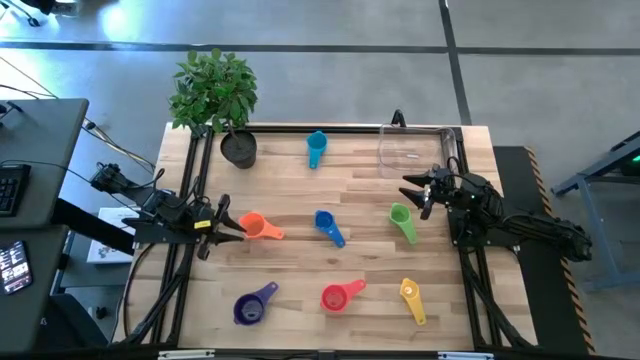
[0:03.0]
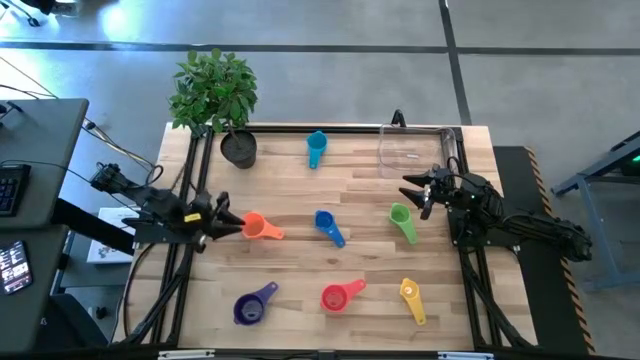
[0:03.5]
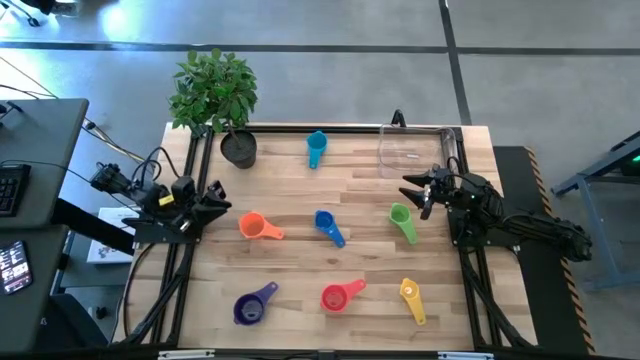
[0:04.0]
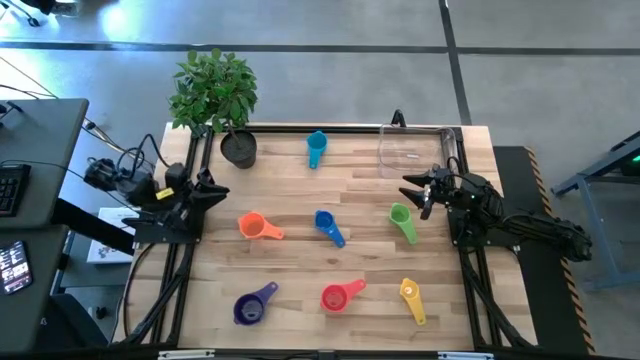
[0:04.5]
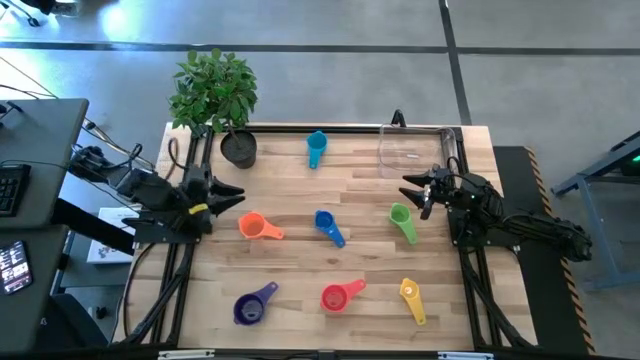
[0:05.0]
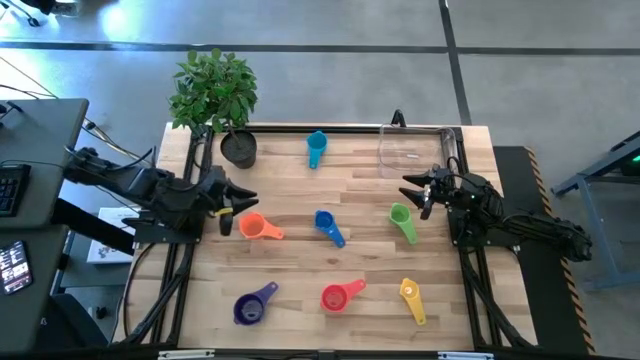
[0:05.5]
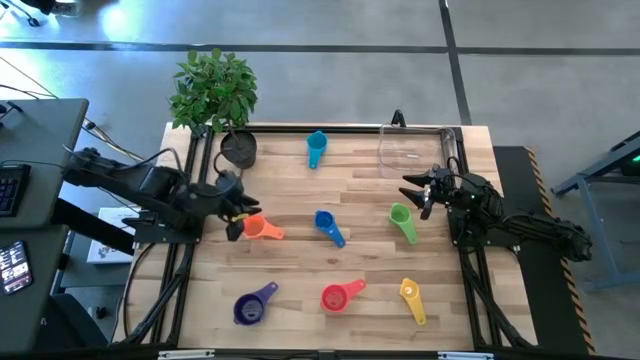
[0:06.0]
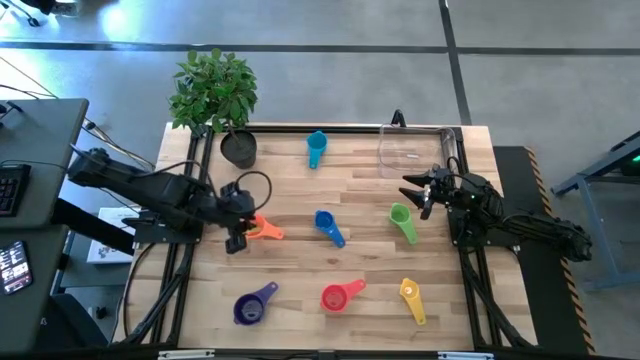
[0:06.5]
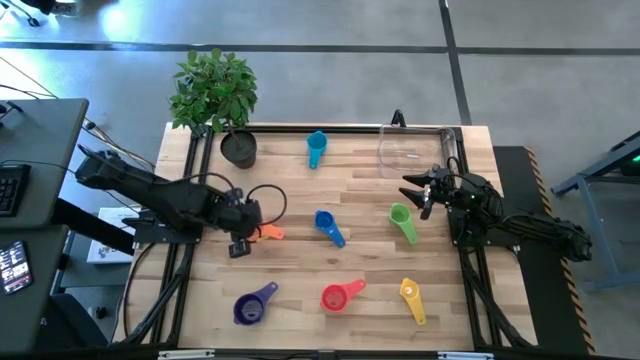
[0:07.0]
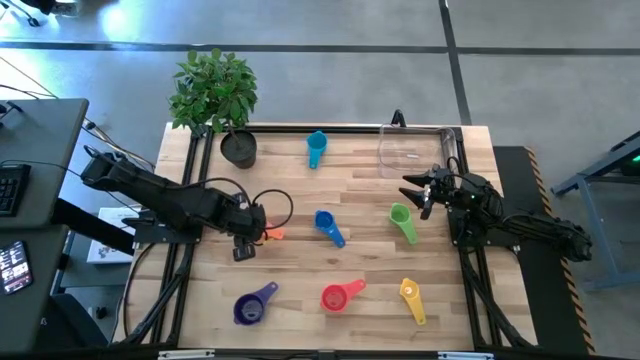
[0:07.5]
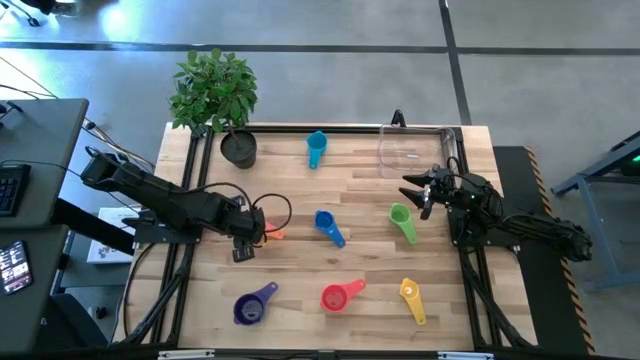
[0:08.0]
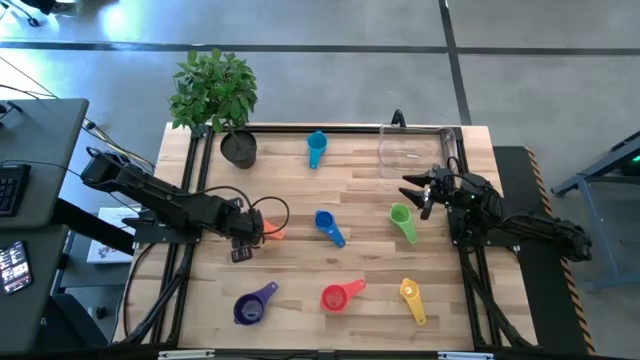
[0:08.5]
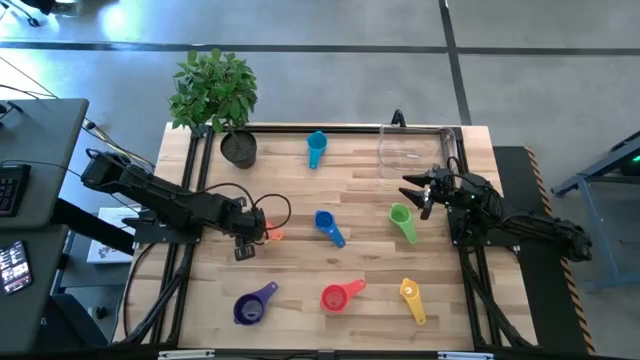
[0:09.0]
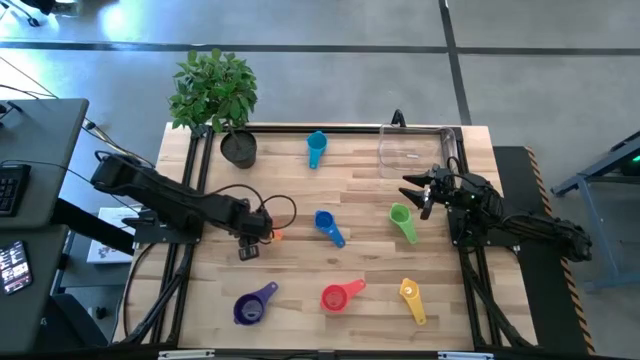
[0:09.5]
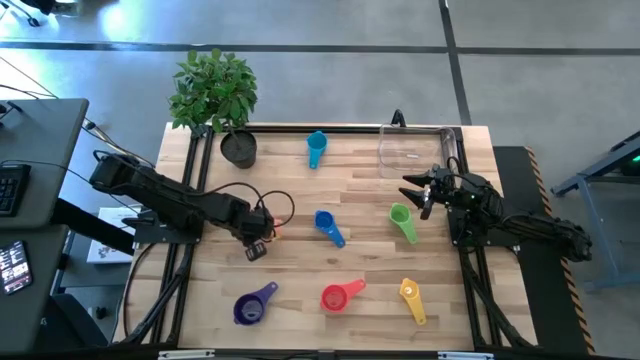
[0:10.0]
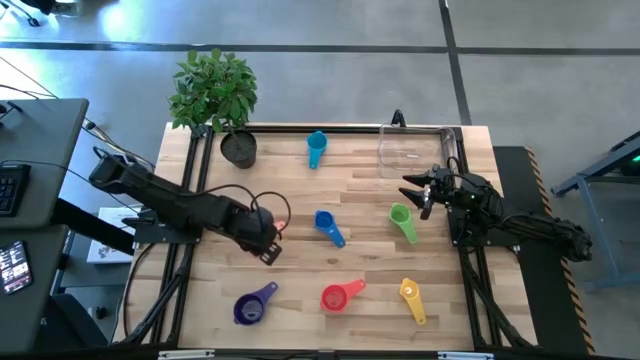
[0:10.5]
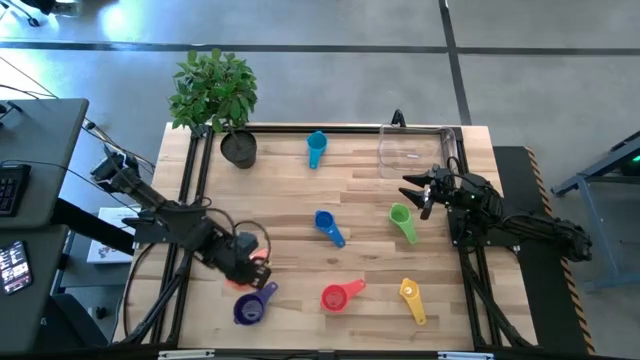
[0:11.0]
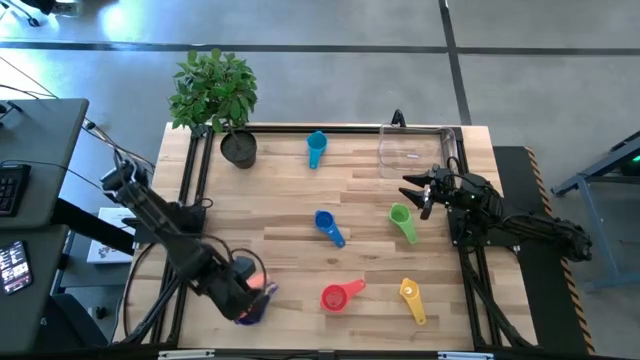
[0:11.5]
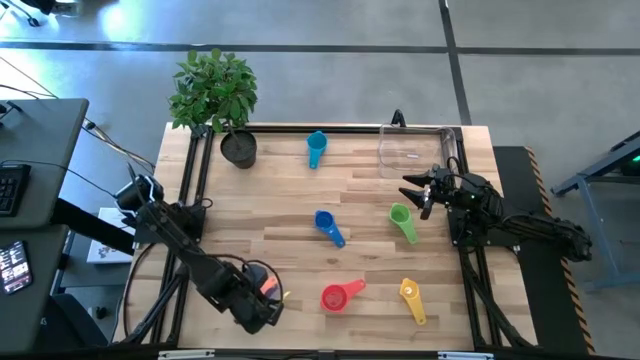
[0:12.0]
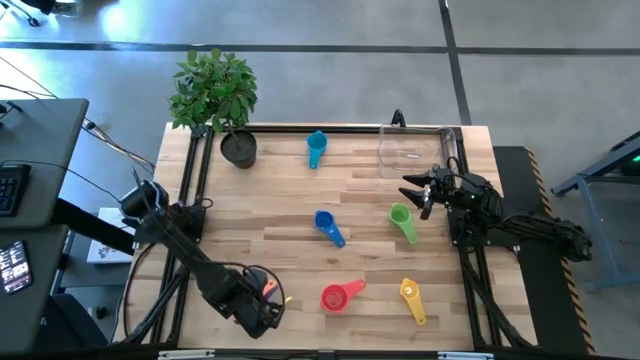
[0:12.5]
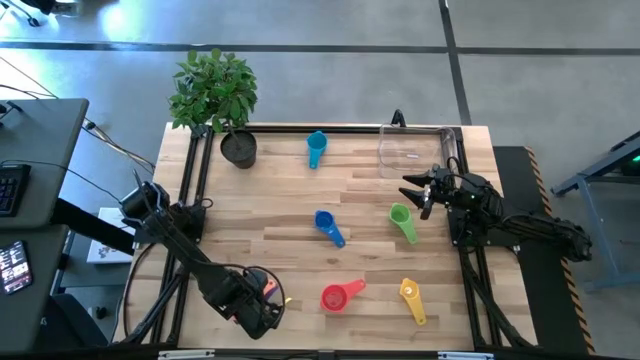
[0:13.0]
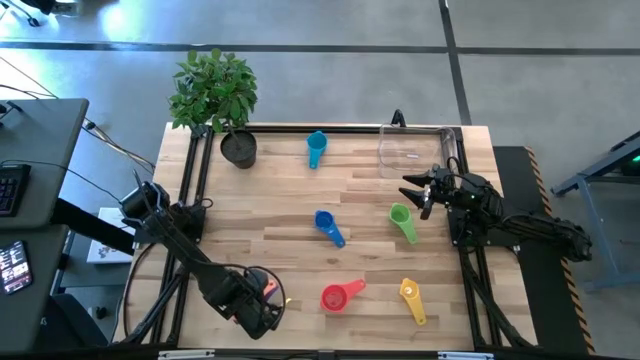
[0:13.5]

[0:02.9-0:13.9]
Task: Nest measuring cups in basket
Stack the orange measuring cup on top of the violet measuring cup

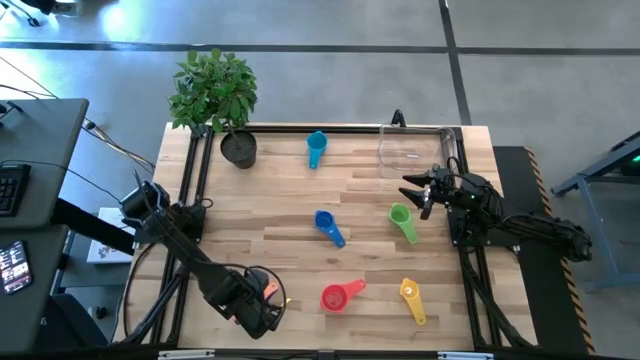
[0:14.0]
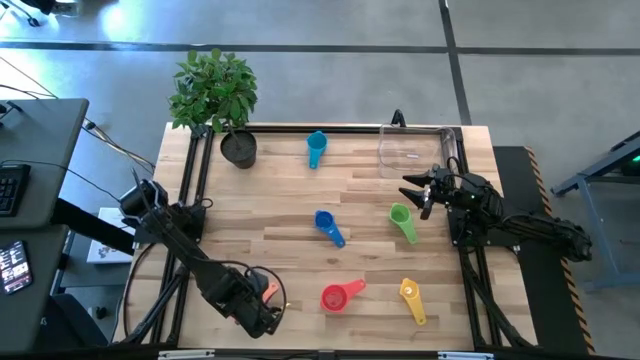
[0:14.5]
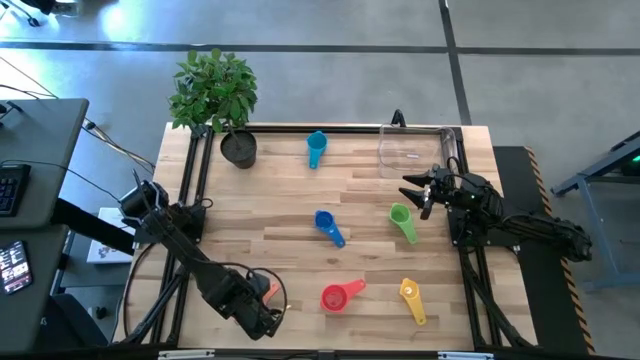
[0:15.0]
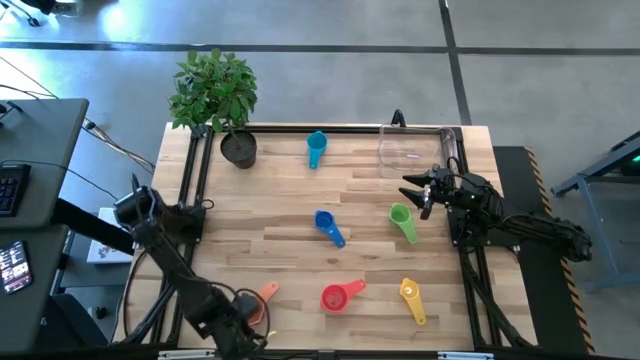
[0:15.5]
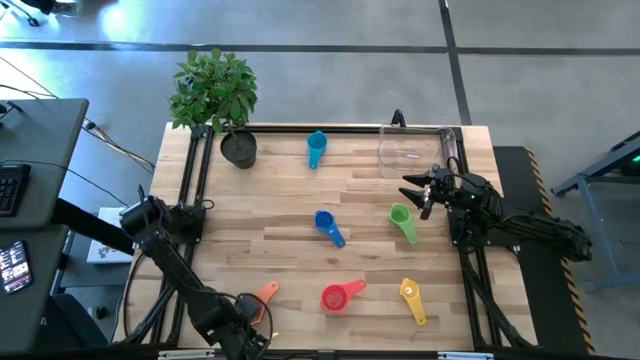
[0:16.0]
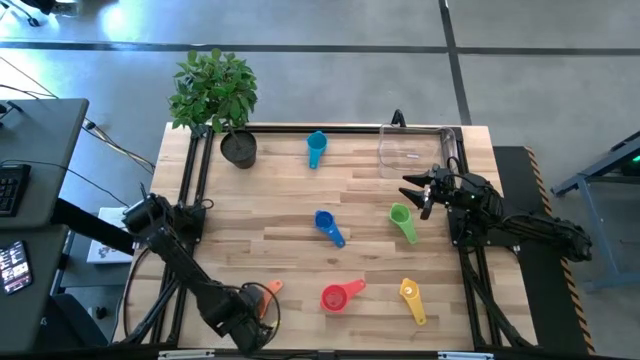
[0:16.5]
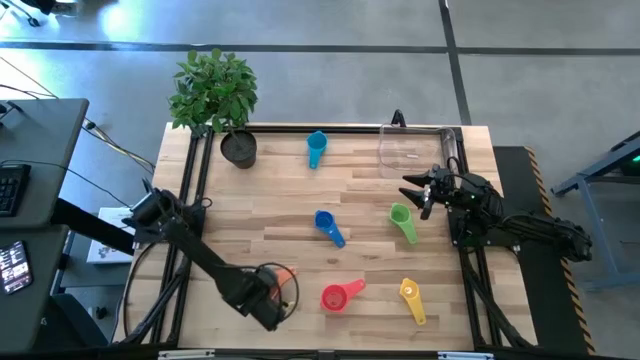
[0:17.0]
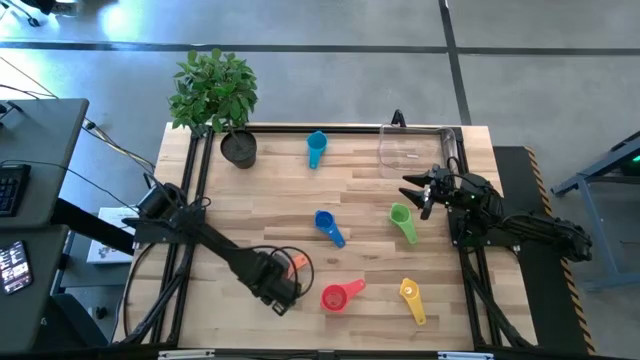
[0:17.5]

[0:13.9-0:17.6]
Move the stack of measuring cups to the center of the table

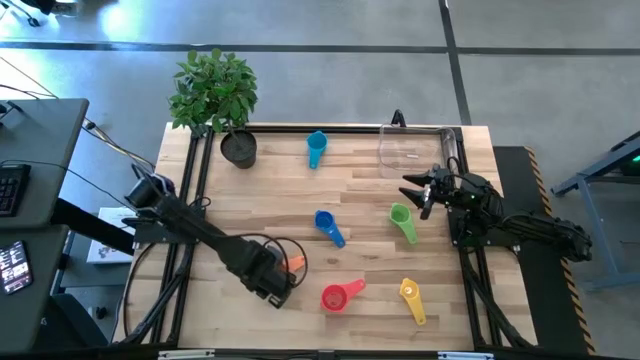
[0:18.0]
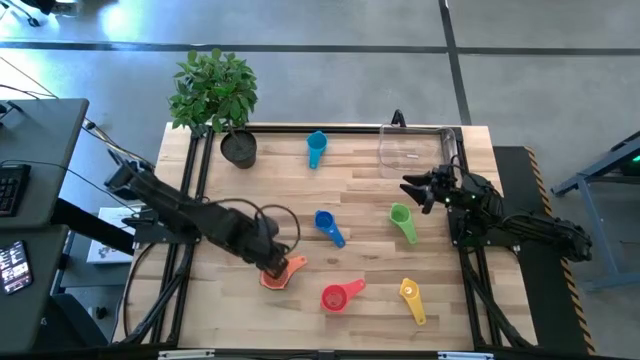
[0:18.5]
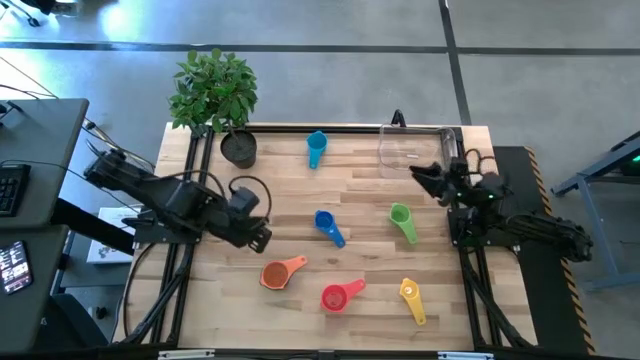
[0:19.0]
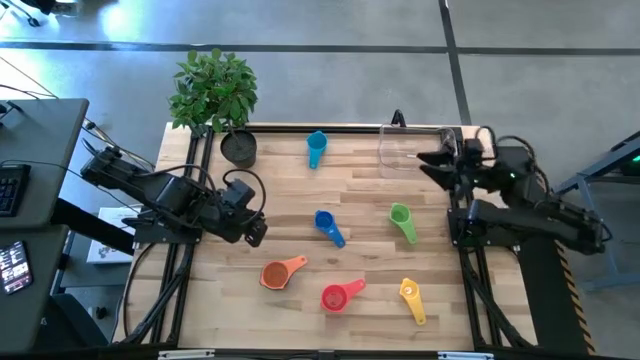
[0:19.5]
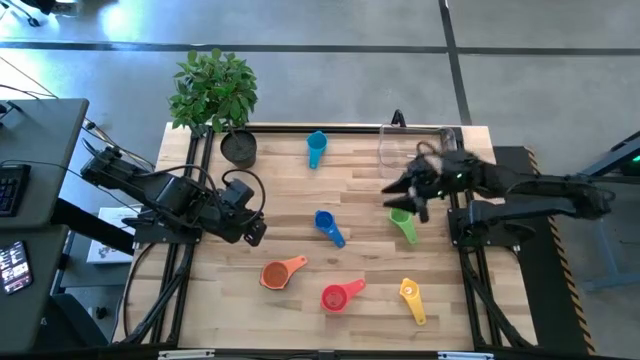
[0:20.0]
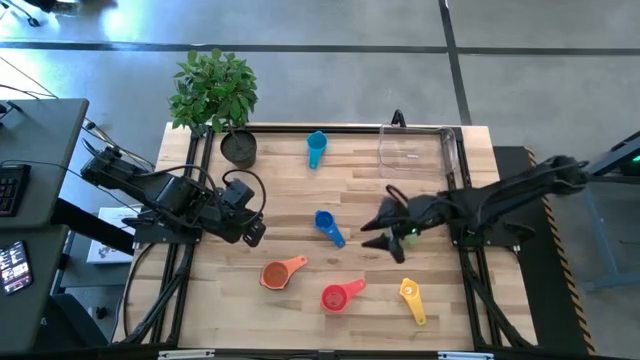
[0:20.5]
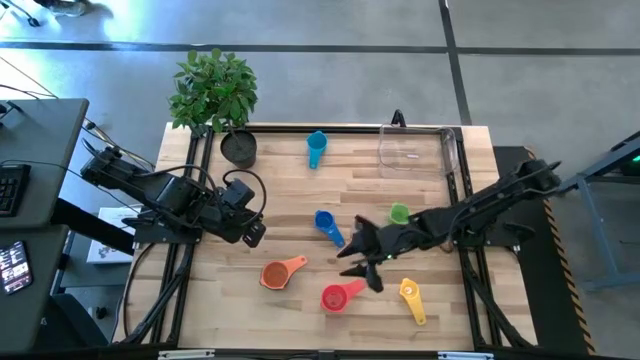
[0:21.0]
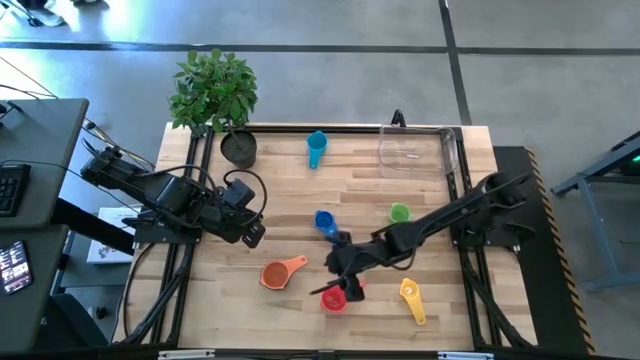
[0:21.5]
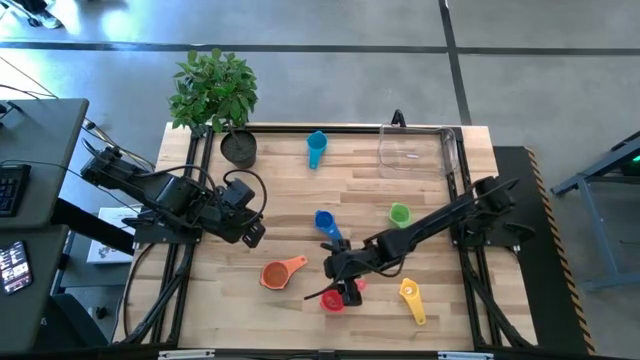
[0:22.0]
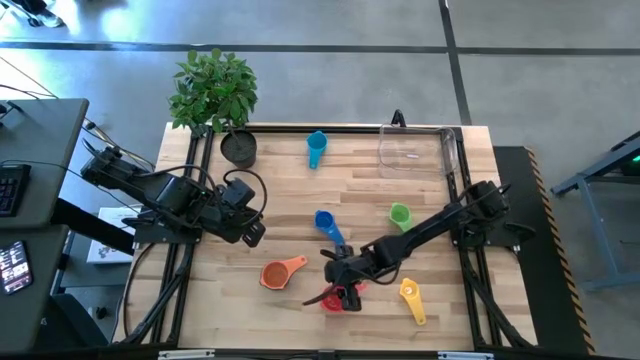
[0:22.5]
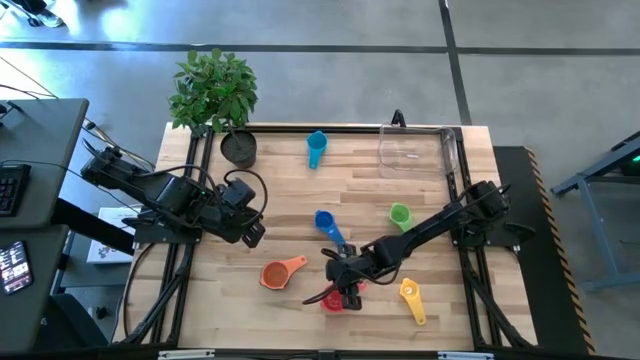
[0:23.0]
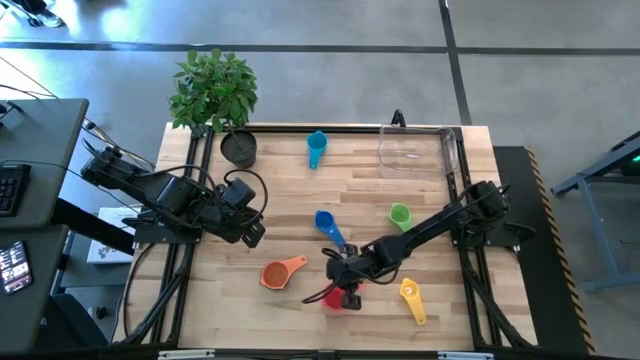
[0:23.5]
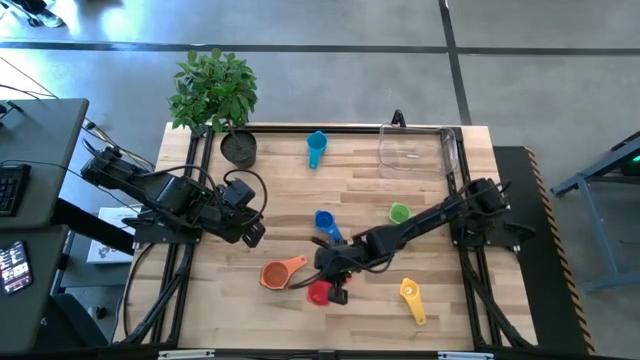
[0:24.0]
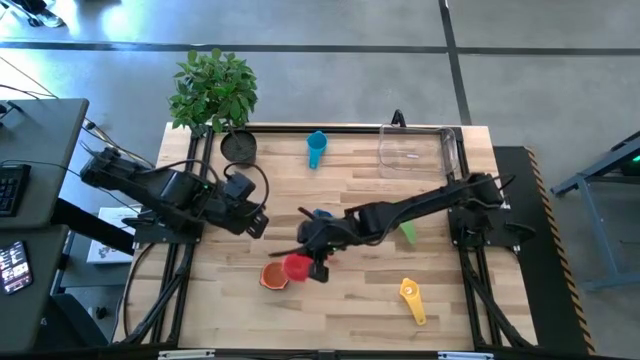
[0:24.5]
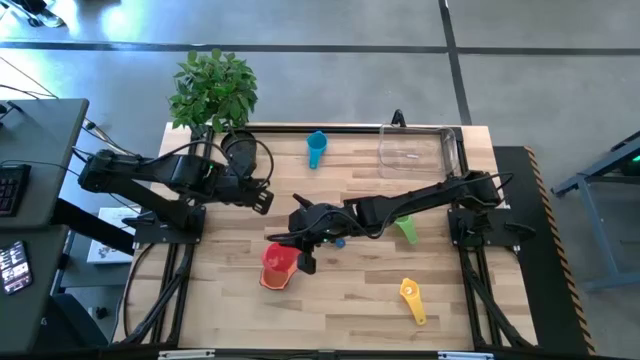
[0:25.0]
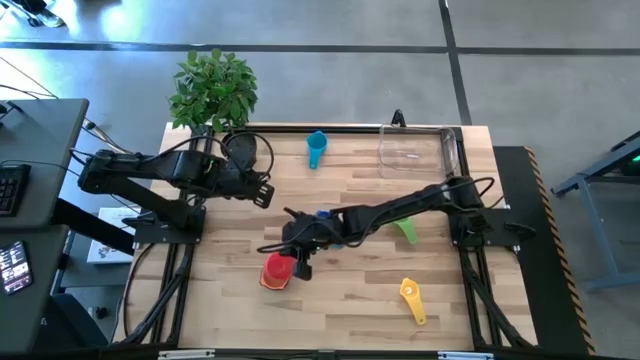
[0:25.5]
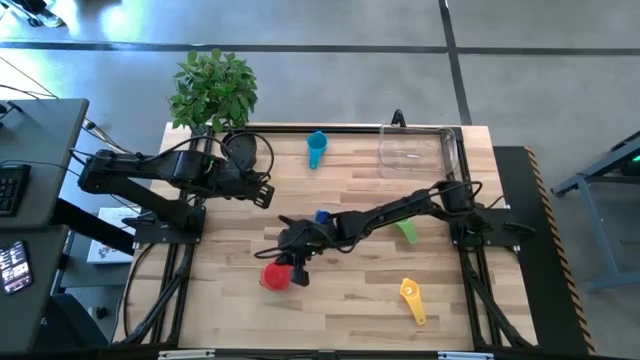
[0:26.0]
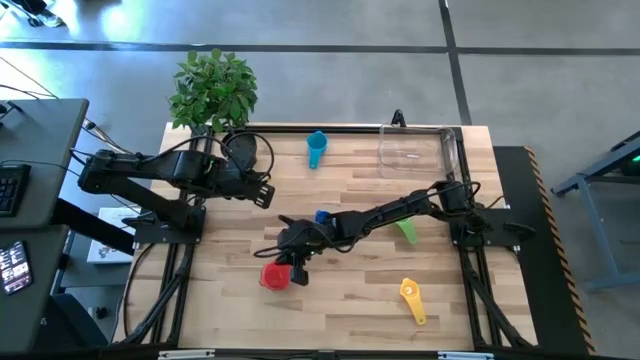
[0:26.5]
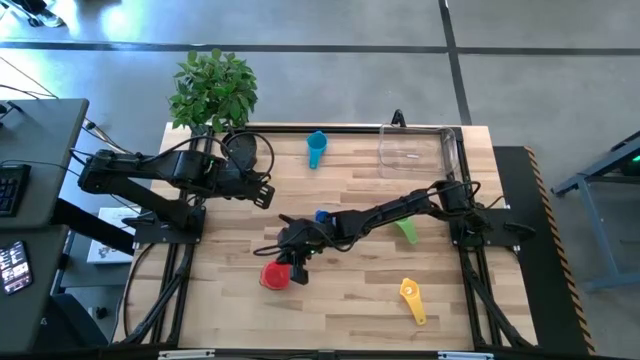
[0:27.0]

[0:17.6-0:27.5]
Stack the red measuring cup on top of the orange measuring cup
